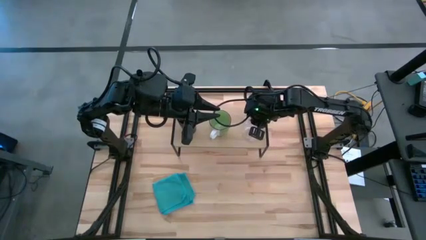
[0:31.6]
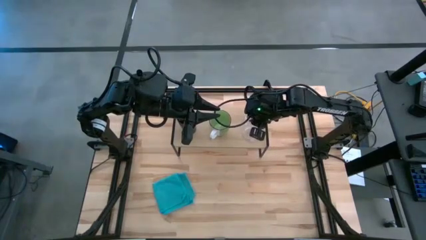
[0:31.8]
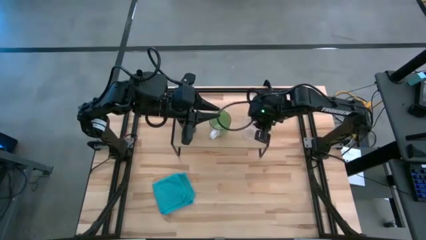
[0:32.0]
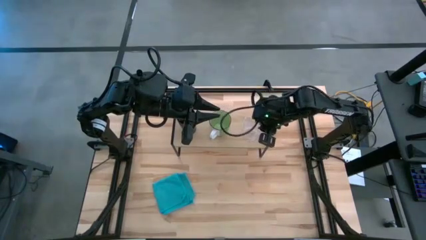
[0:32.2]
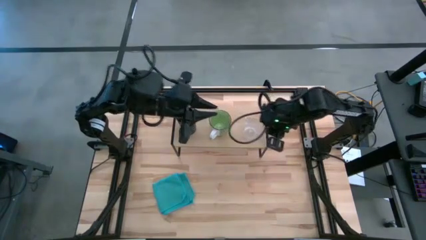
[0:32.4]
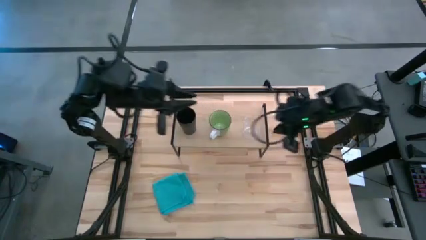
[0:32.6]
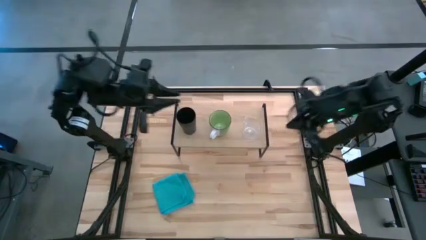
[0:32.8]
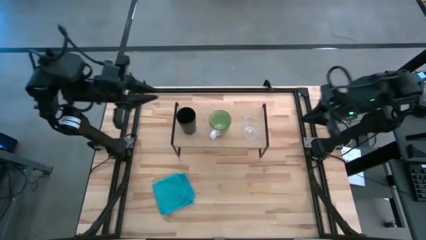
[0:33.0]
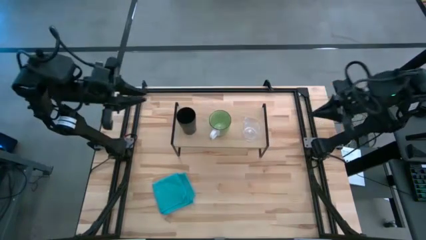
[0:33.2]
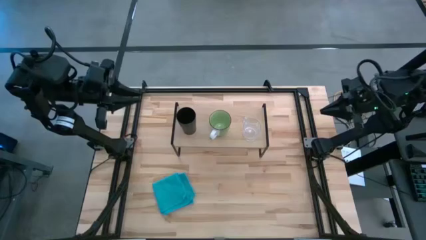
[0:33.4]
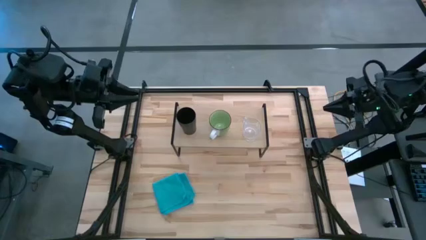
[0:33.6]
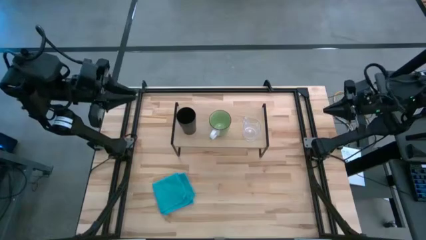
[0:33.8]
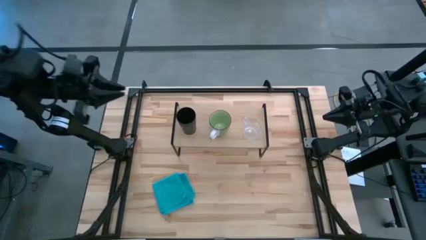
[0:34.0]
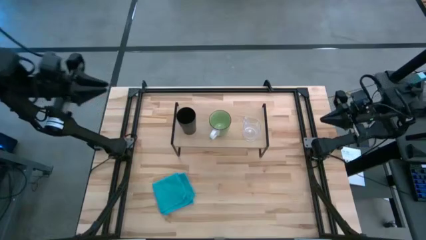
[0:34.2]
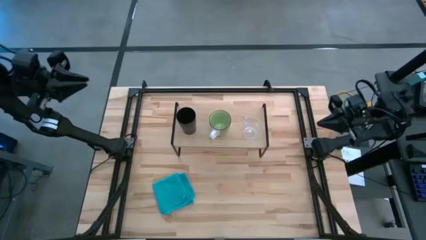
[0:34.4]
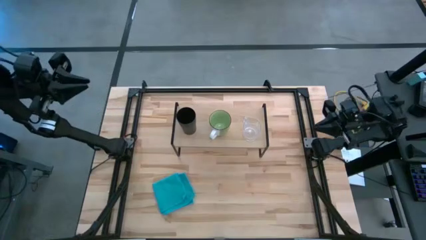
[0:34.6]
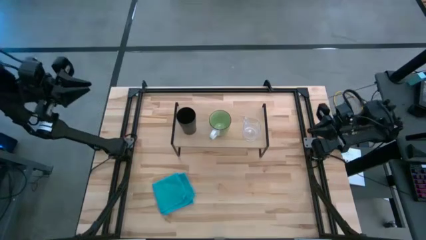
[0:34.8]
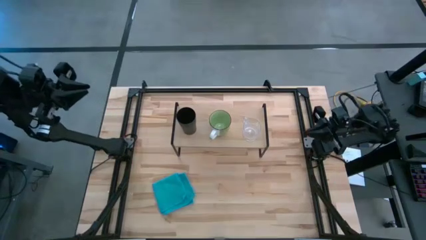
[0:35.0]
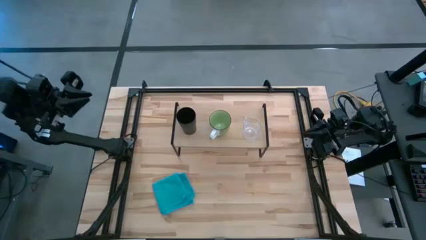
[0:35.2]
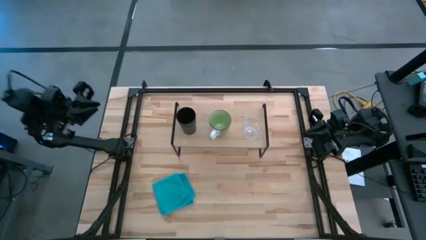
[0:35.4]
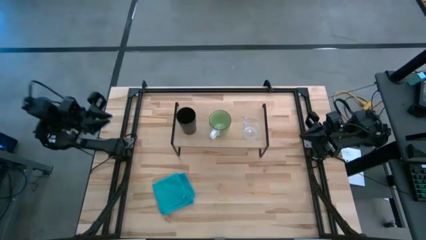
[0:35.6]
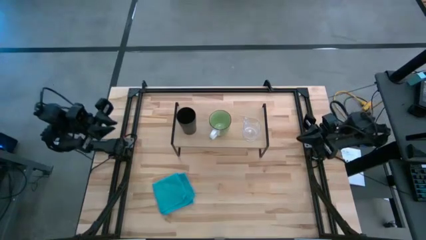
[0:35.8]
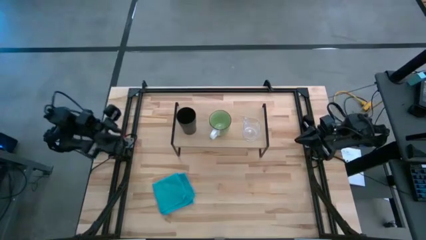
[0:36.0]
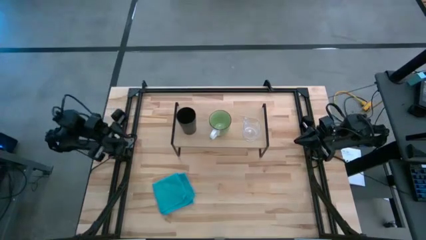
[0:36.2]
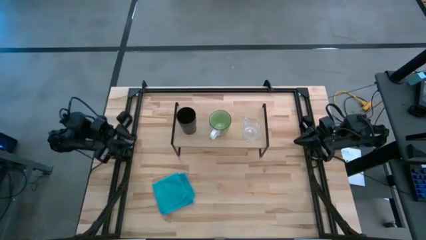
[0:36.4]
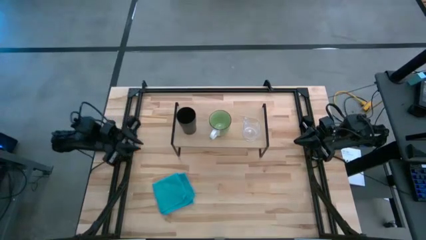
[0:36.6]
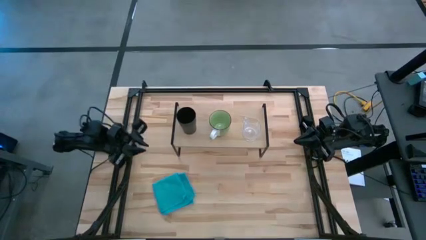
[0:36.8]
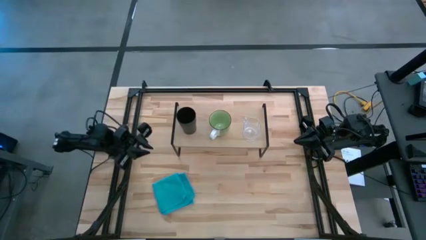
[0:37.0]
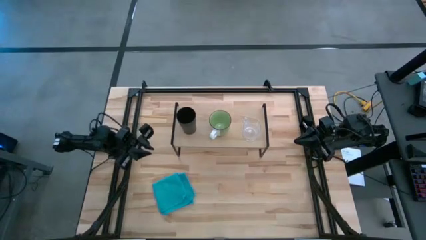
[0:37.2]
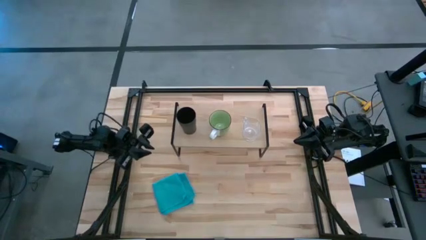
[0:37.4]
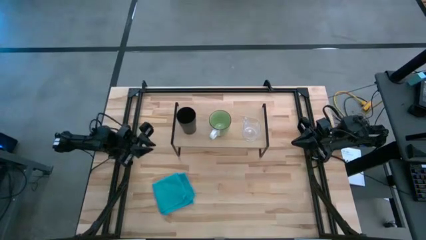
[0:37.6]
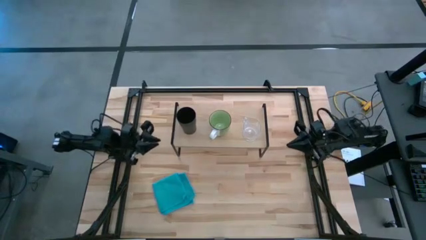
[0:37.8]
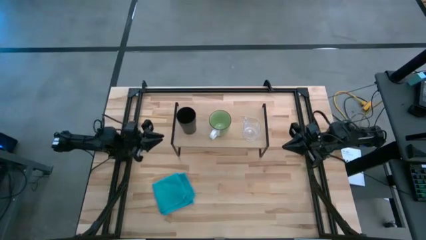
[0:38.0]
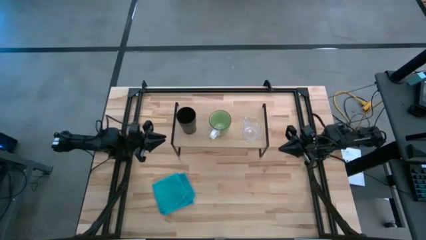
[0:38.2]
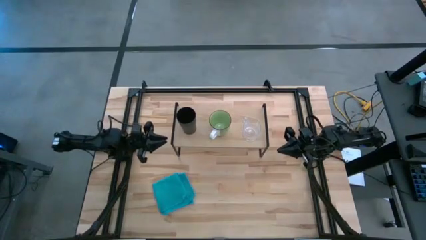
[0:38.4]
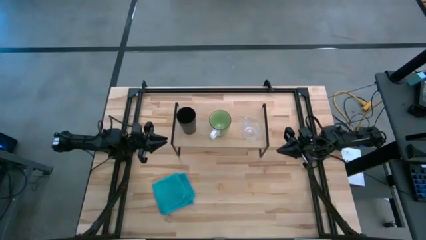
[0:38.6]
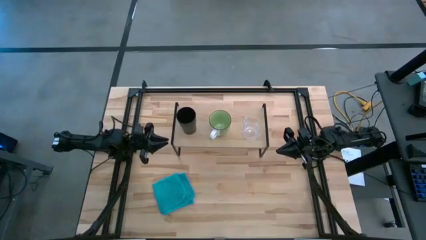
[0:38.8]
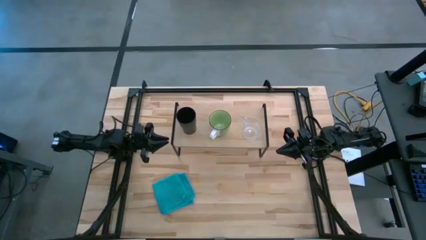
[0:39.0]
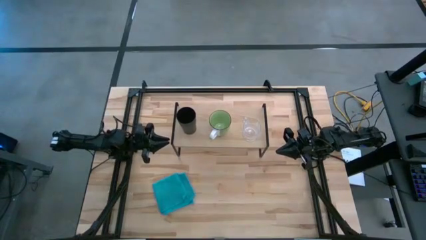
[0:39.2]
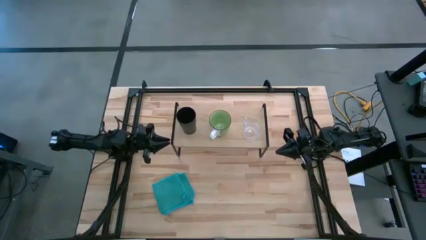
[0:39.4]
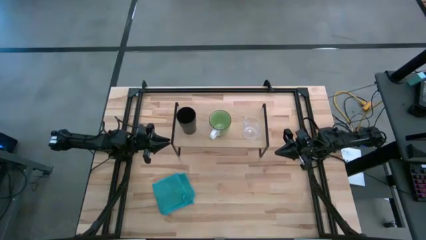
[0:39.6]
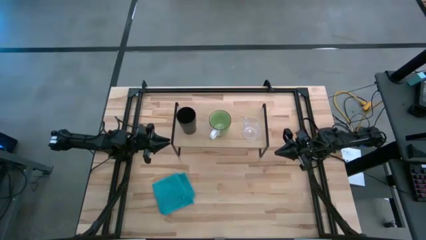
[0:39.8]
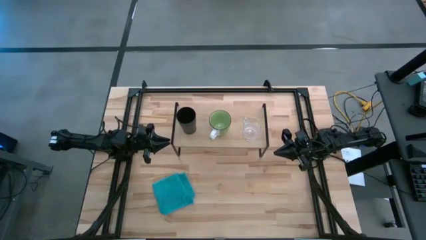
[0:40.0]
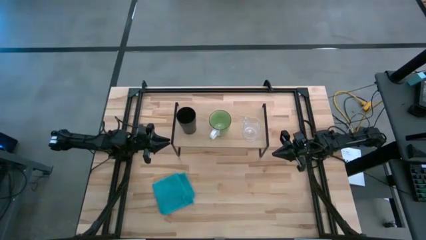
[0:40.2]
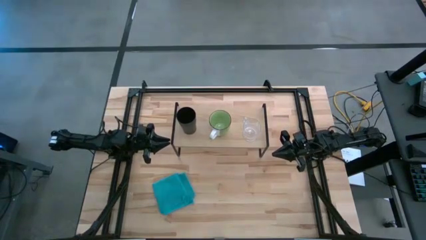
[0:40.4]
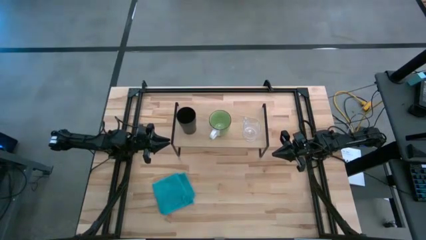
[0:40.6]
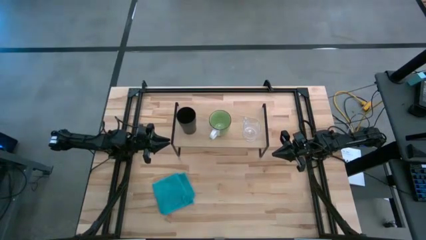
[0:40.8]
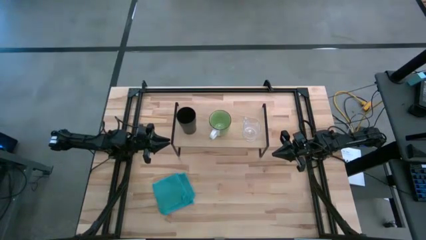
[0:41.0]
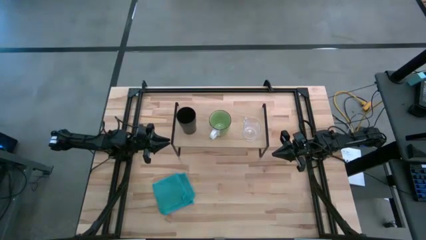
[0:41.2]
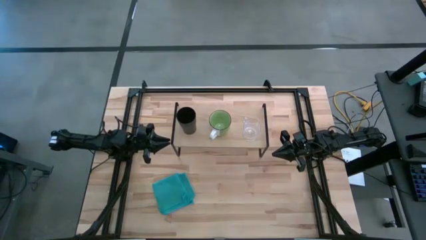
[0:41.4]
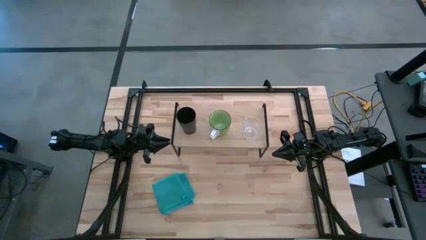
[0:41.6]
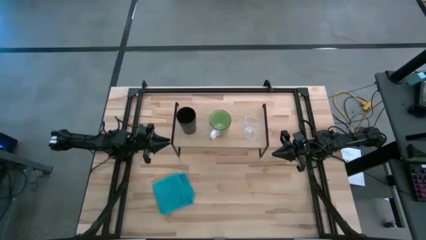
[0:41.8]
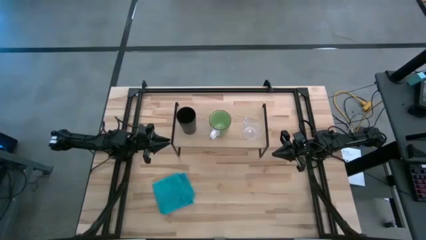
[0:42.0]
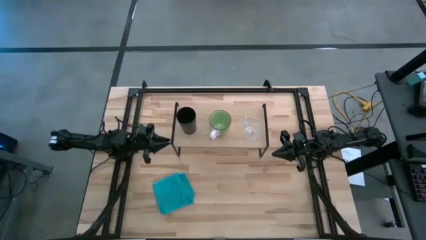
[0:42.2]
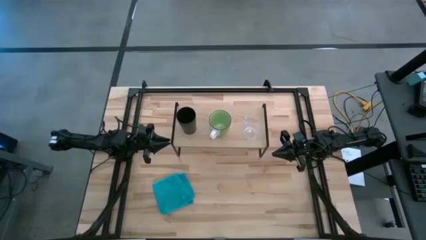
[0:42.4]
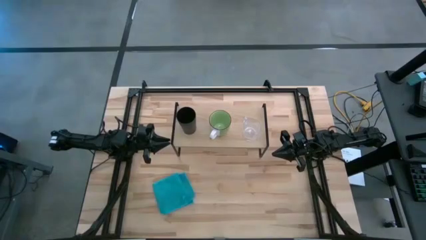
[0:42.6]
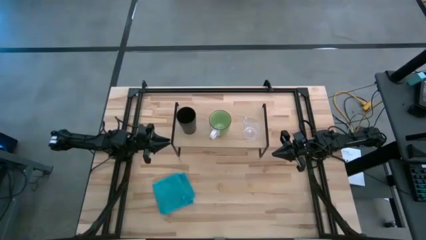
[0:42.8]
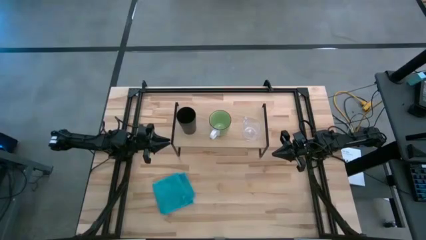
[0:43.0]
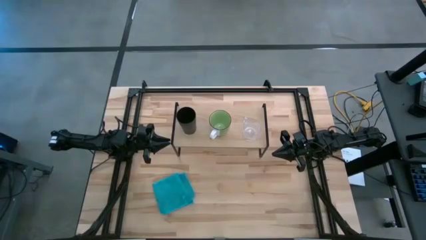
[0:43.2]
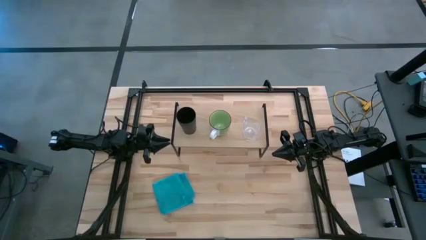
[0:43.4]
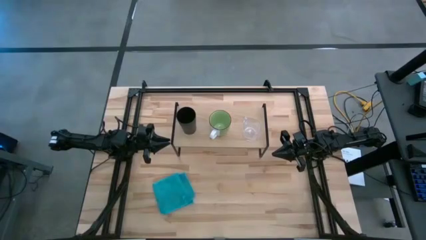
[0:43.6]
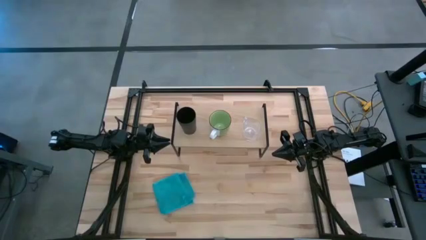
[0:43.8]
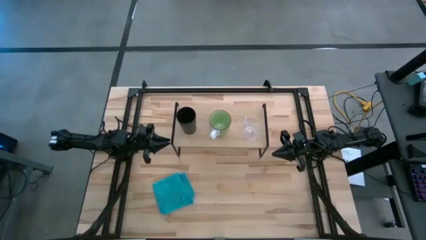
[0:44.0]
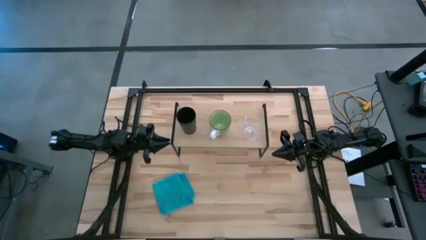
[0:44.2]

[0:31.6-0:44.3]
Task: Stack small to large cups/mugs on shelf
Return To Home Position

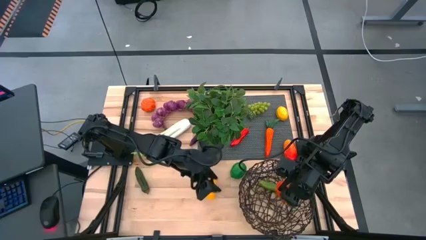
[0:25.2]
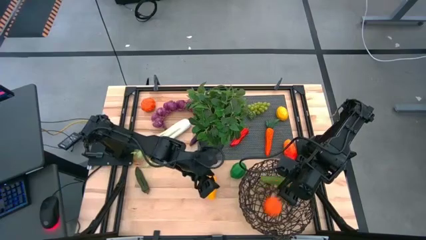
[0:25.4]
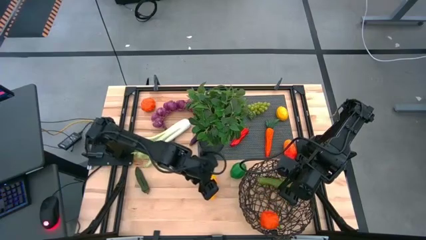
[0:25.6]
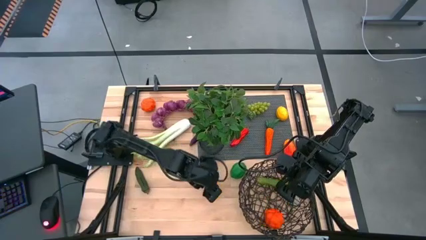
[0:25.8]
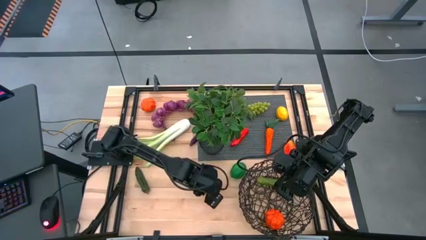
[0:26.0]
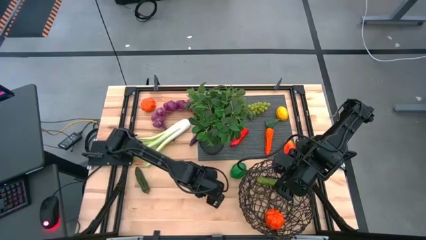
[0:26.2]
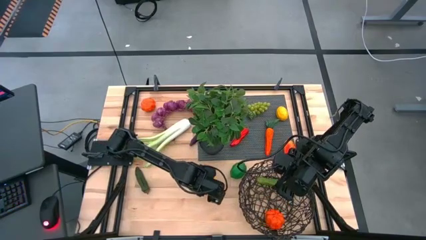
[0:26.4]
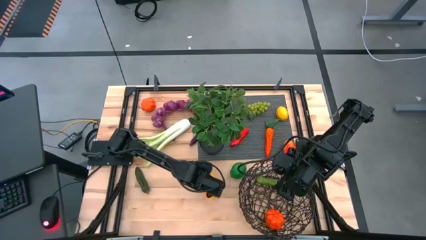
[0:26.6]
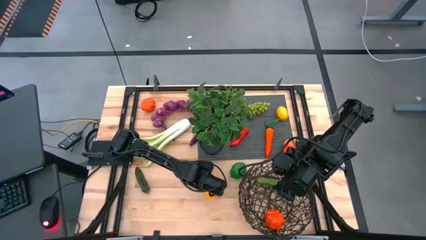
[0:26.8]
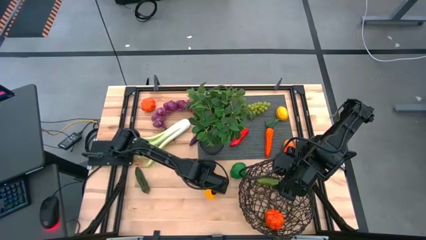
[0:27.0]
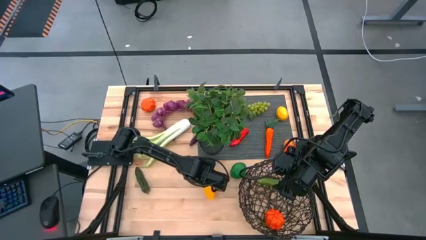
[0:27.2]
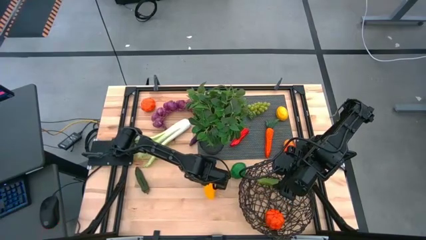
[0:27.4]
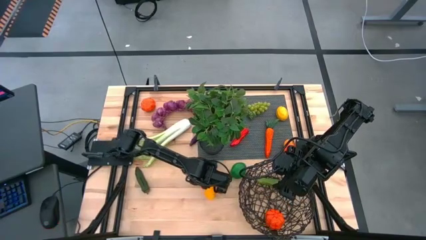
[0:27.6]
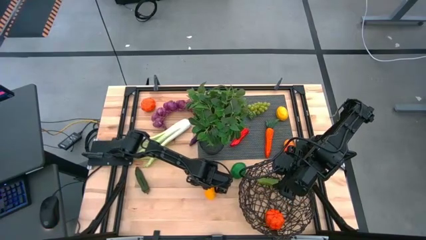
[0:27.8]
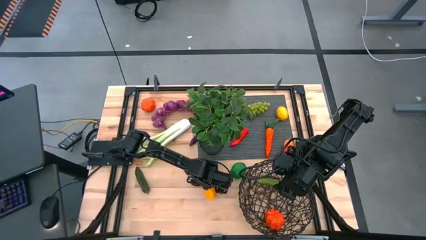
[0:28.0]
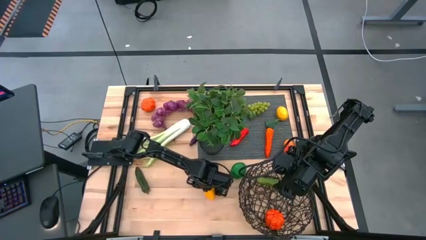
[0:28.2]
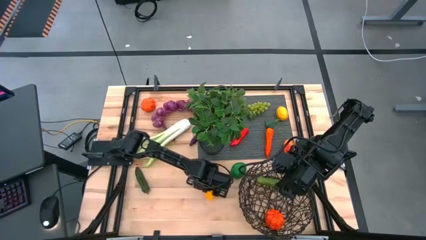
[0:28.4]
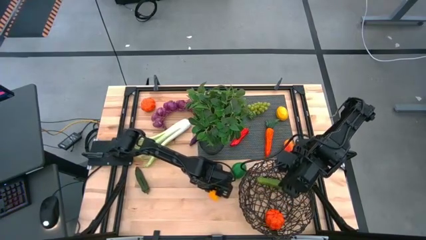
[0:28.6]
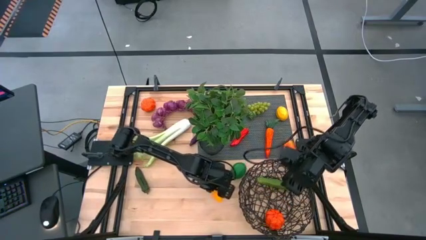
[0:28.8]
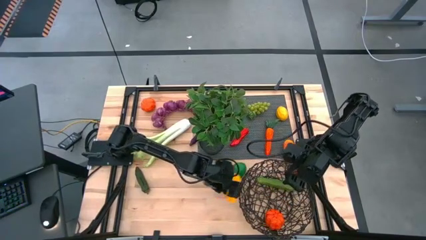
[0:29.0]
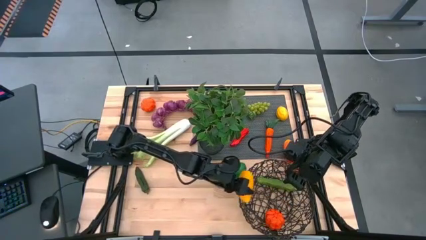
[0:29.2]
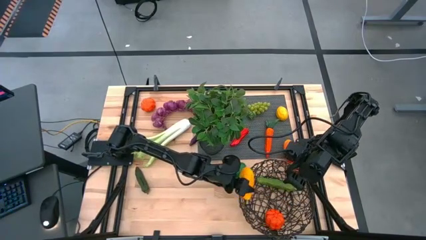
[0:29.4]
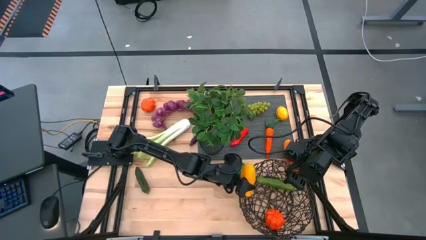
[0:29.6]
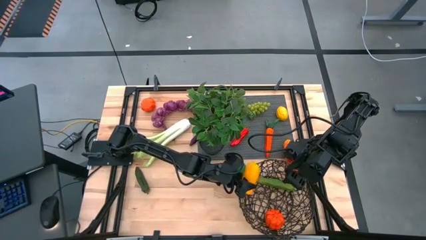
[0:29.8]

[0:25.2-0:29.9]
Task: Build produce basket
Put the yellow mango into the brown wire basket
